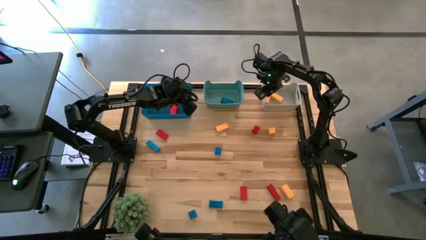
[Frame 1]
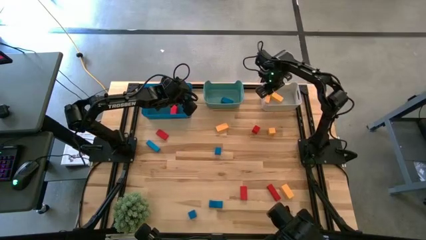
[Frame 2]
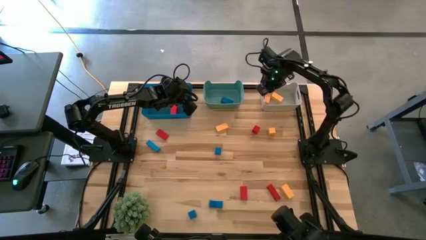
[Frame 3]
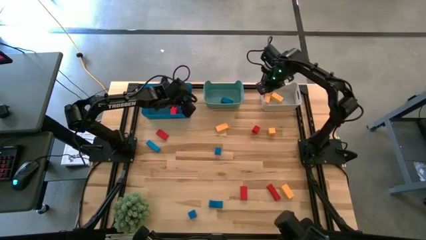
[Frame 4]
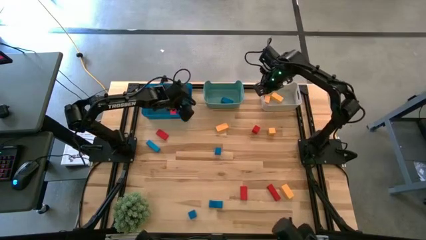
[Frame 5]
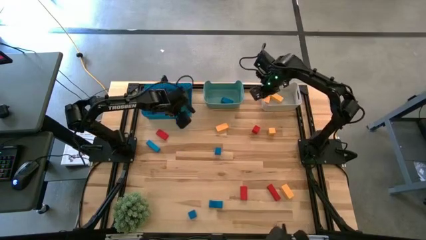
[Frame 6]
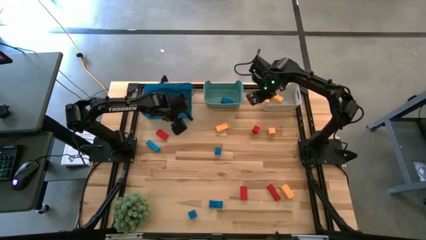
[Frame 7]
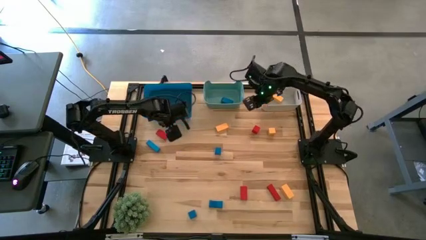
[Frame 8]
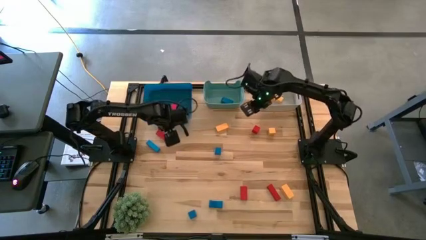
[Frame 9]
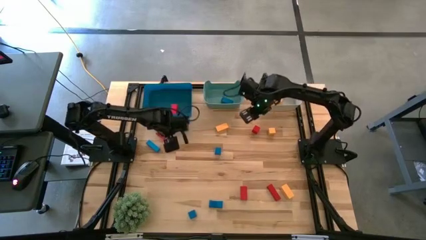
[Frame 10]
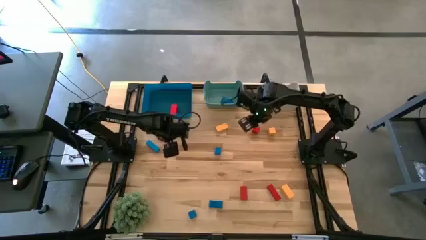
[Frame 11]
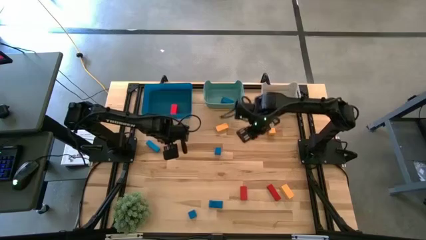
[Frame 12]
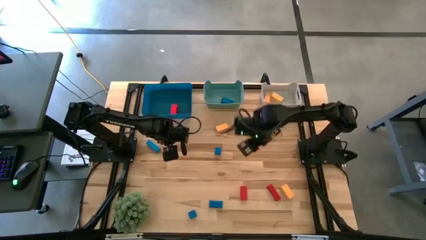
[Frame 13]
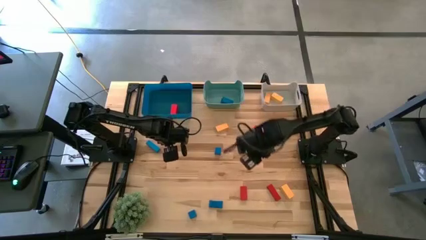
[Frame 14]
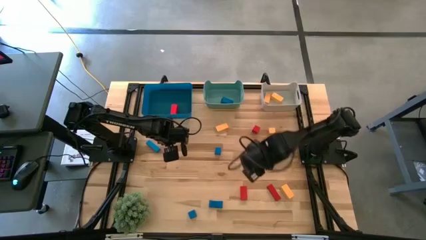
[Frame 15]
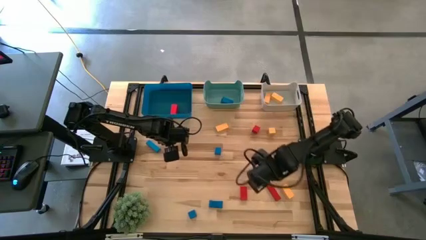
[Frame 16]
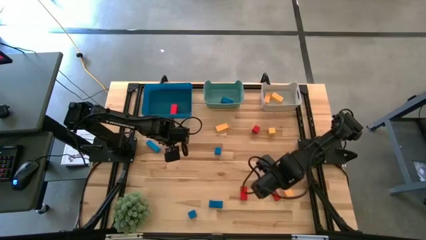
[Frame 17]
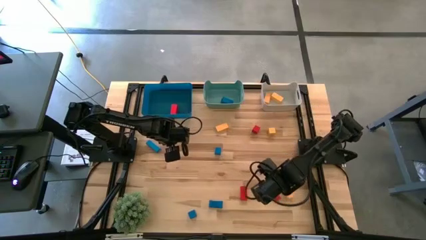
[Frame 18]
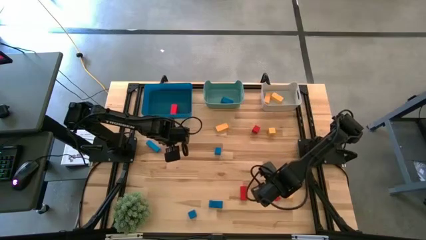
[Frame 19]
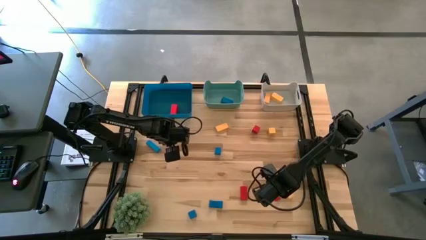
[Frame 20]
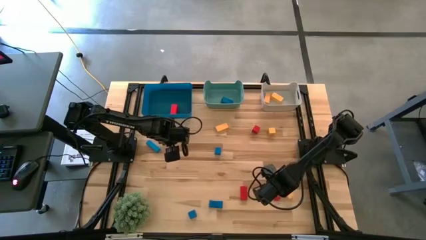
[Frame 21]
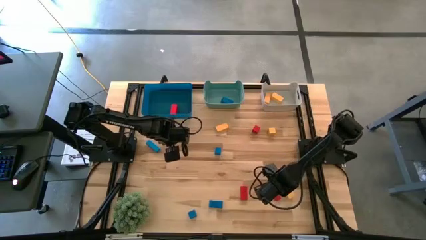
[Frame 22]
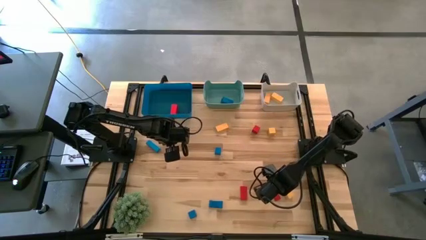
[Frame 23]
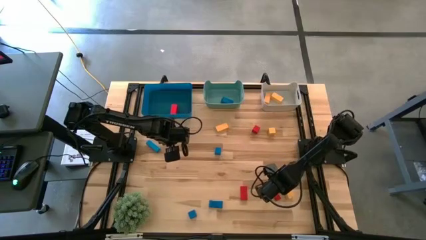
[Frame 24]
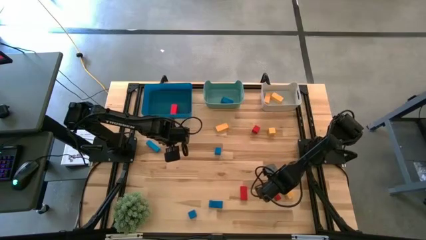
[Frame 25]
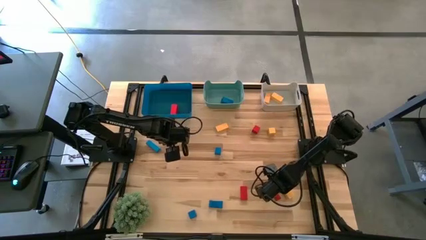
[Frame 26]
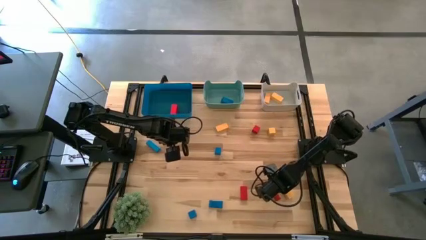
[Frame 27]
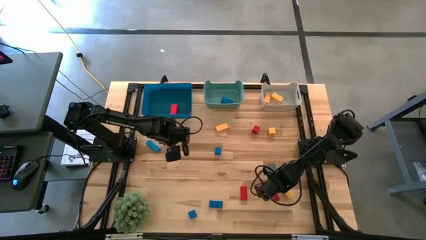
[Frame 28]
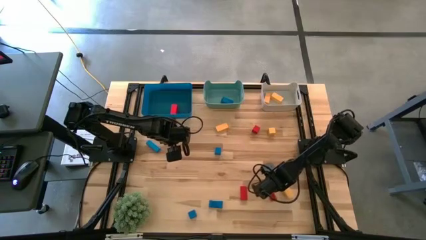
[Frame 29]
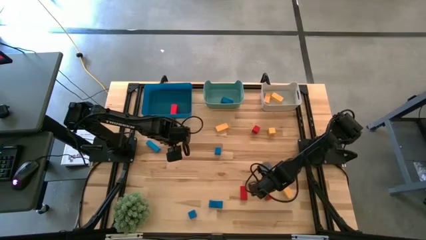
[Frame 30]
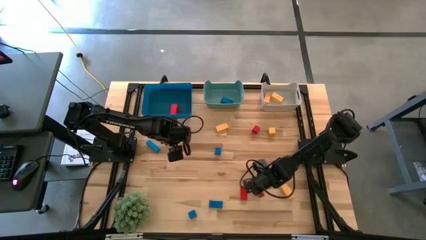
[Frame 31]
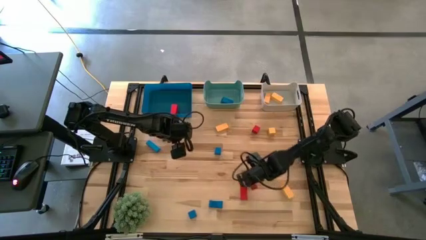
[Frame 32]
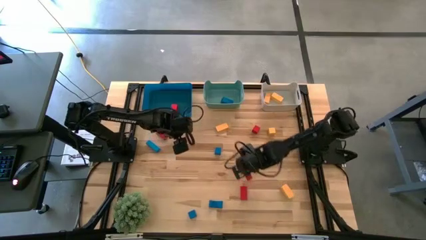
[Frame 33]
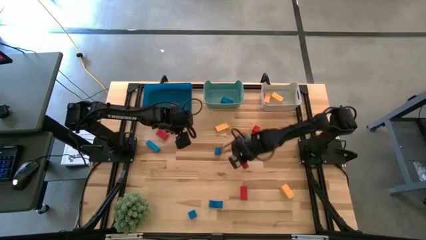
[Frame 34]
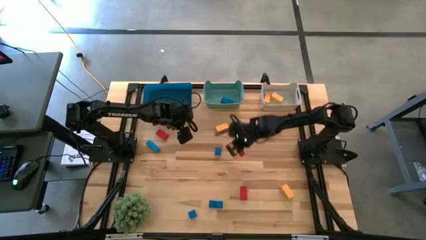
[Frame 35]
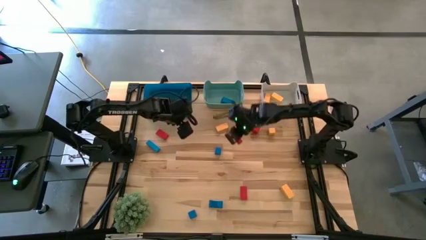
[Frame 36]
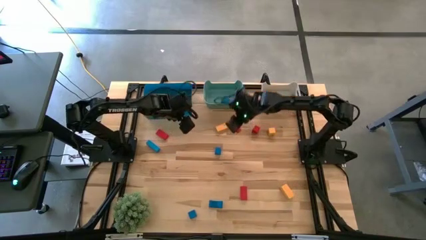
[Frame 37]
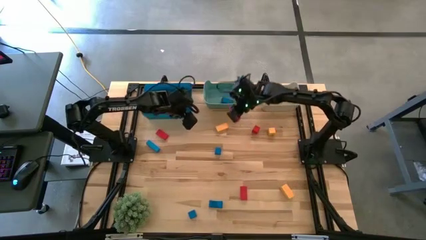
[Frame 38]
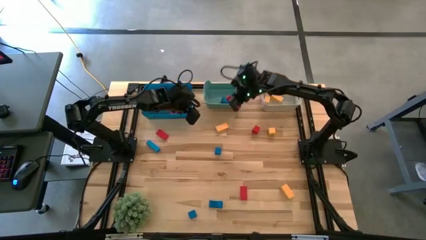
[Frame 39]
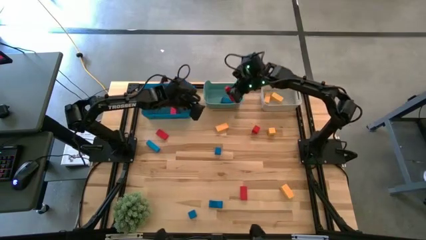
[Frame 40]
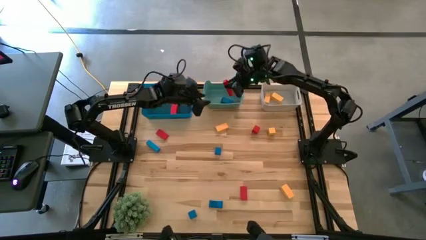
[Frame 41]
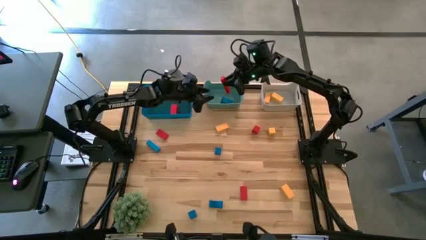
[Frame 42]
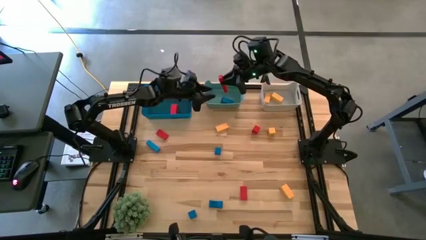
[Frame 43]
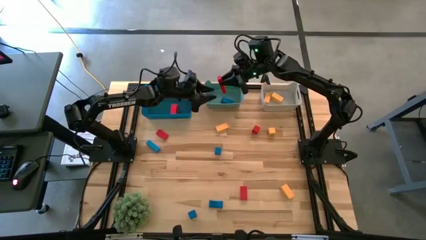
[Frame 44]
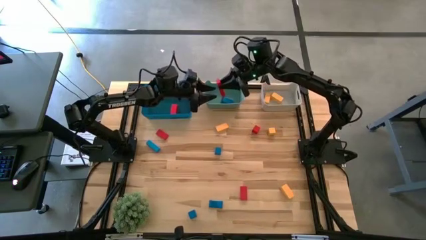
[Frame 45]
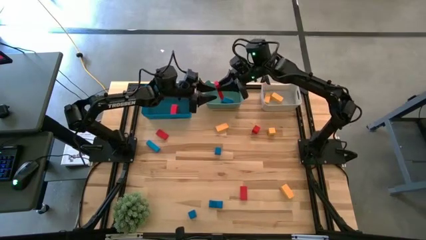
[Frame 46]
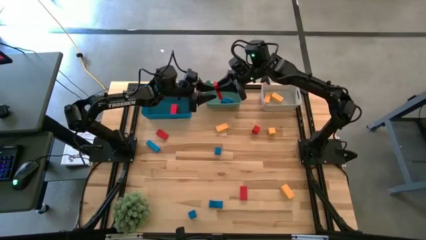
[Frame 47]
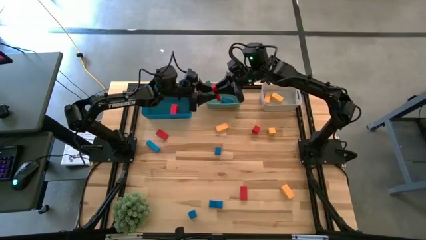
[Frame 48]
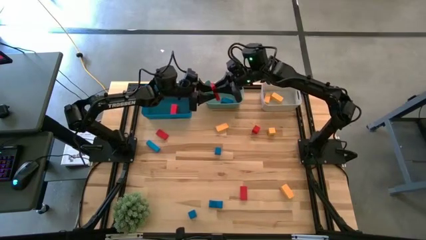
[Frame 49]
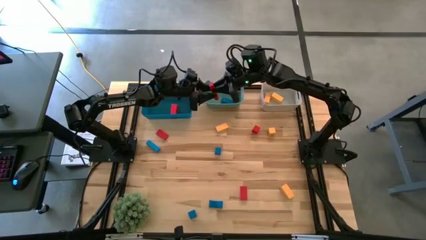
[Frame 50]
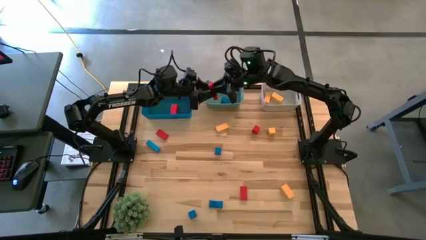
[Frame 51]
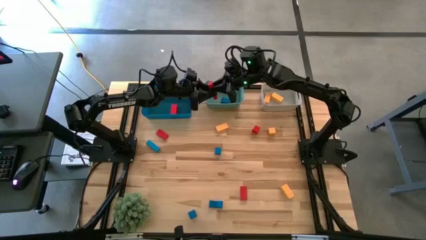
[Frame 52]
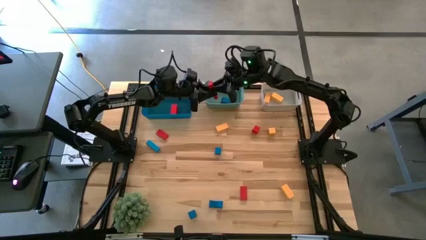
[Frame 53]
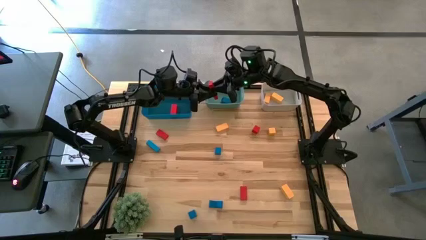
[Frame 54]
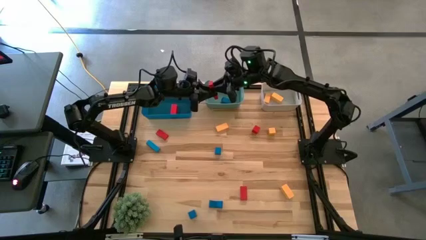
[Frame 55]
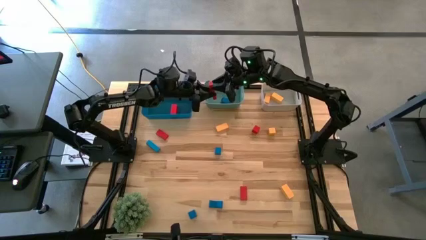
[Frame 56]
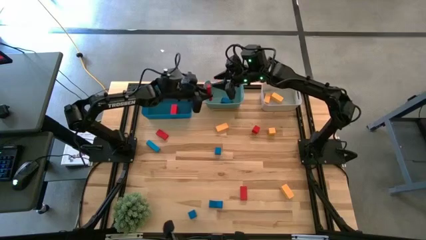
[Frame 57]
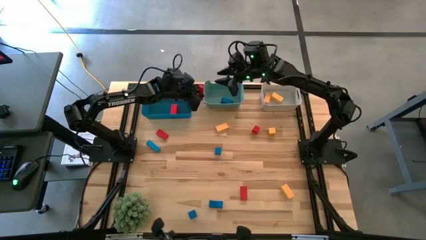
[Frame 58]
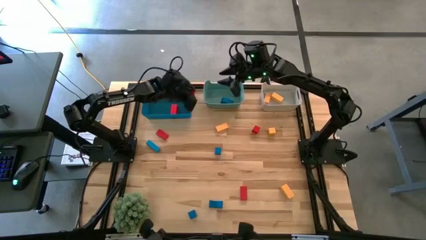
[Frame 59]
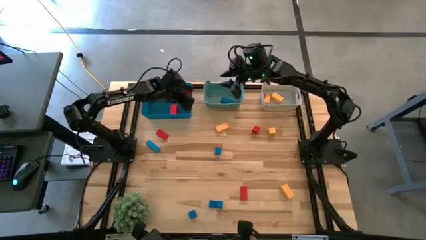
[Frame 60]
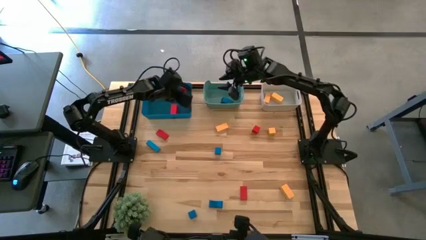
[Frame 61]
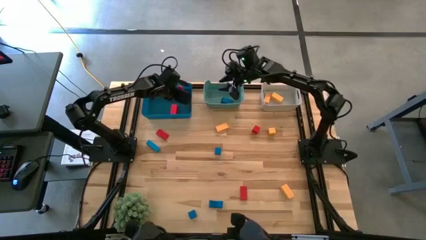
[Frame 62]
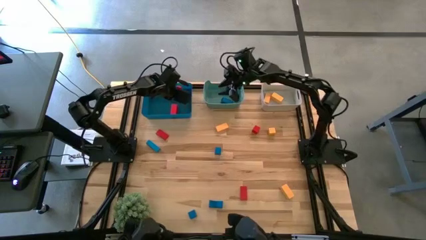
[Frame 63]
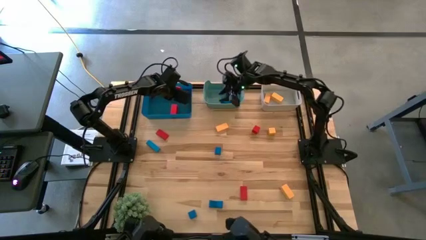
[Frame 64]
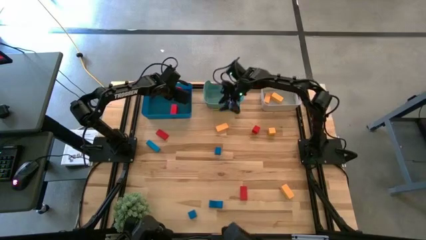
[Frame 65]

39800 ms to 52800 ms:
Task: Sort & place blocks by color
Put the red block into the blue bin

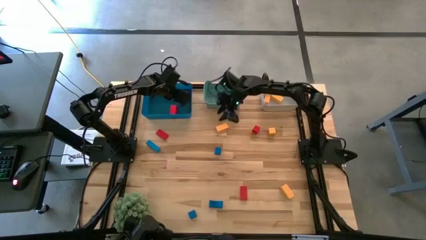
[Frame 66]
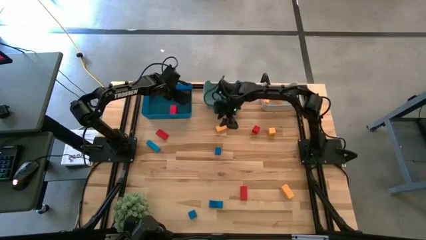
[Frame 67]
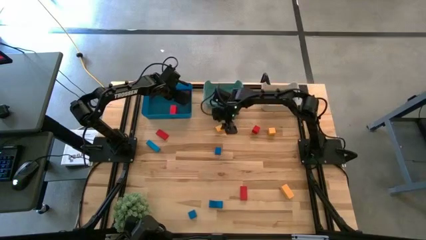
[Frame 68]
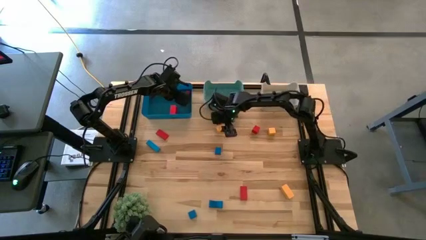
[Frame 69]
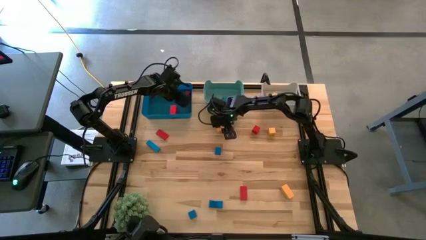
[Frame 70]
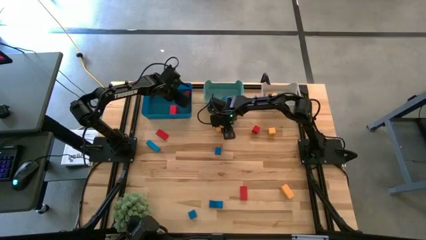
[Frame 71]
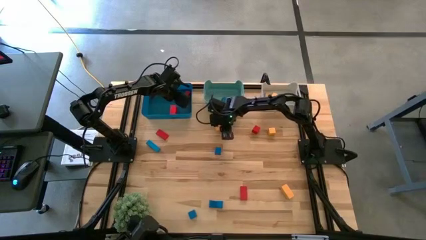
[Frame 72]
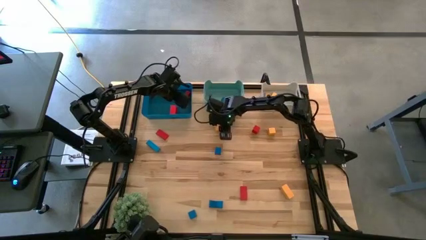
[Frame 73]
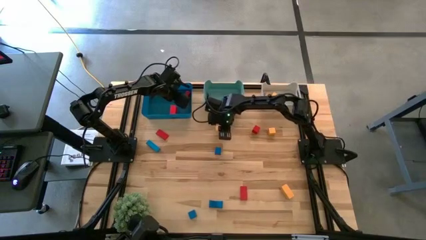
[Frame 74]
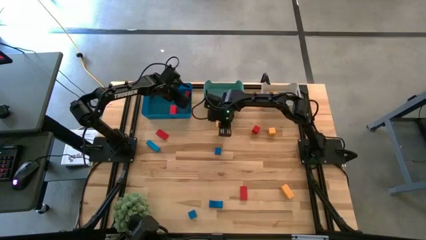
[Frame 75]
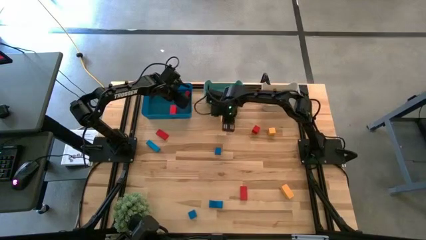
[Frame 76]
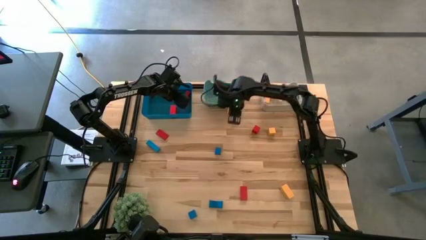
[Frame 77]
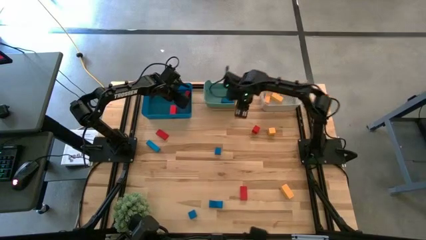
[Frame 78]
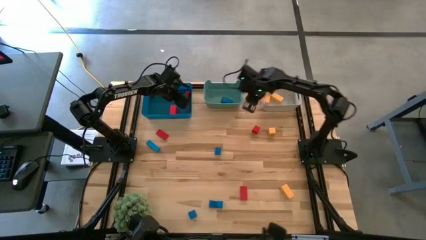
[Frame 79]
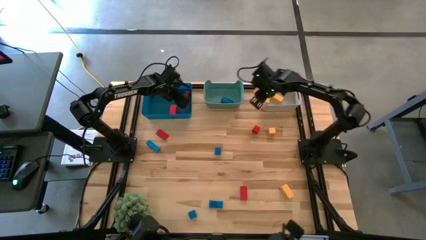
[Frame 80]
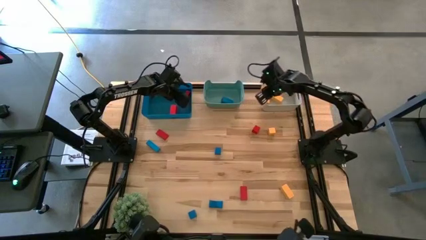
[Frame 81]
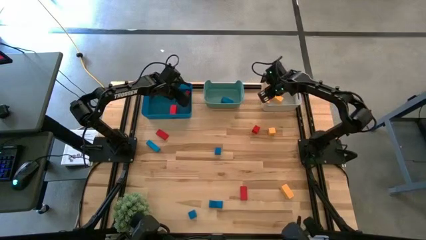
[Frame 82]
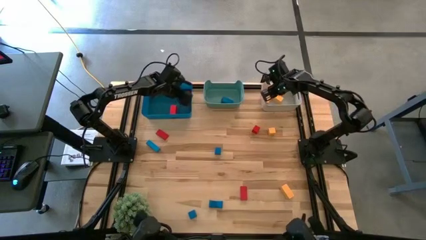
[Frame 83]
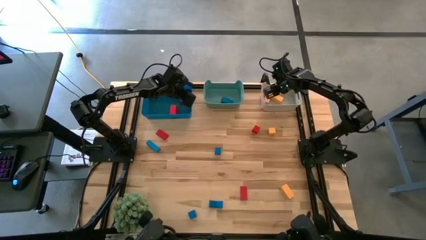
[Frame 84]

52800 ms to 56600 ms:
Put the yellow block into the gray bin
